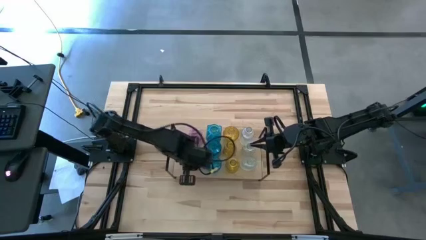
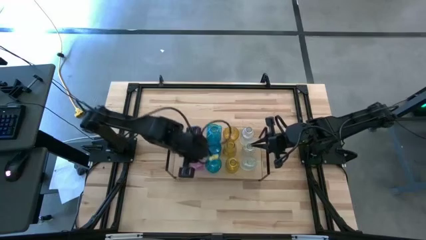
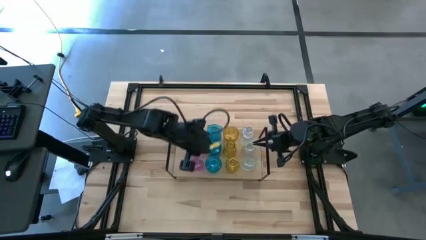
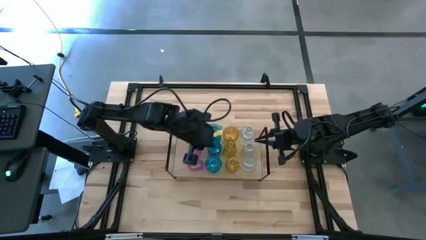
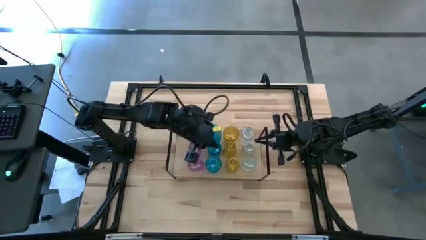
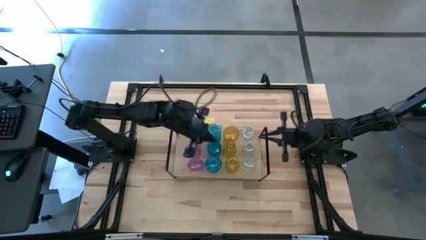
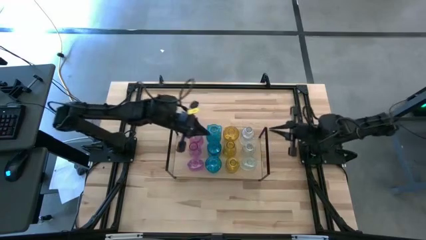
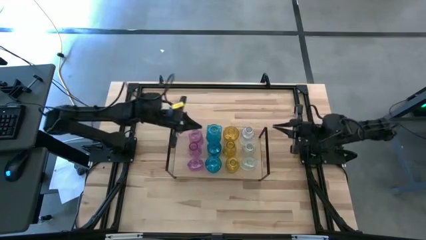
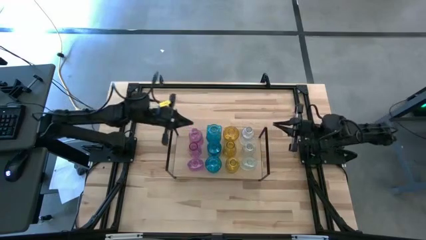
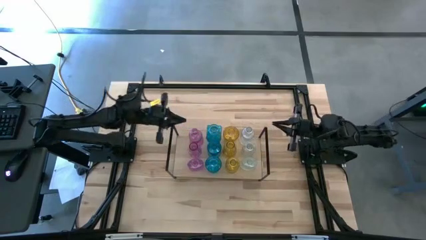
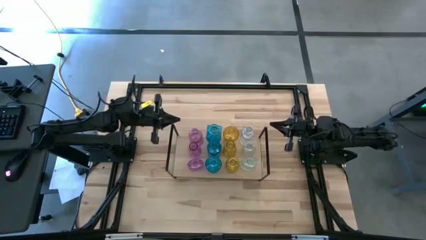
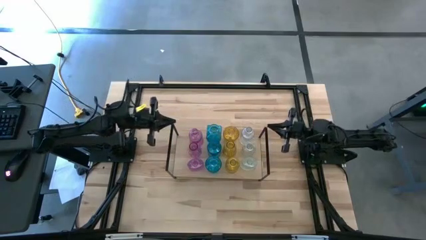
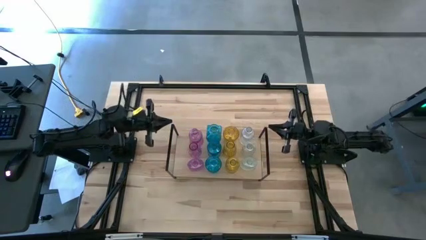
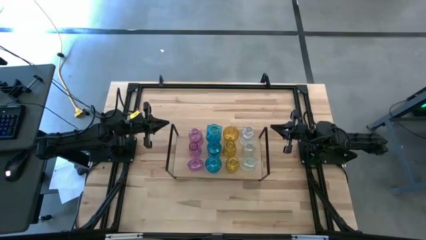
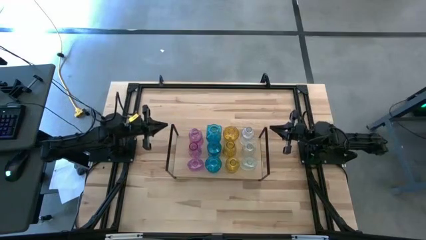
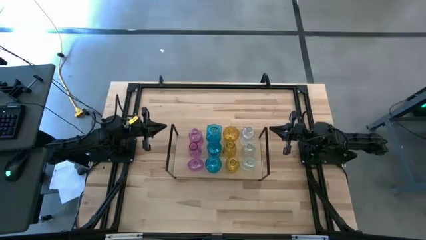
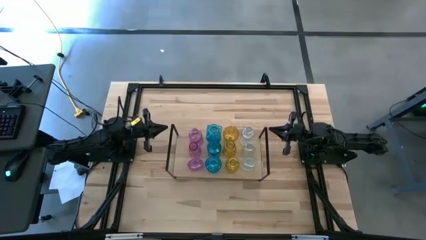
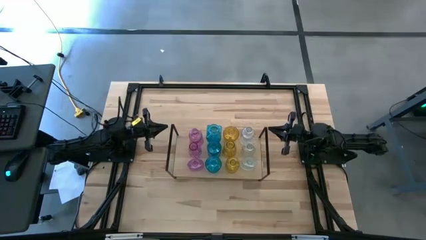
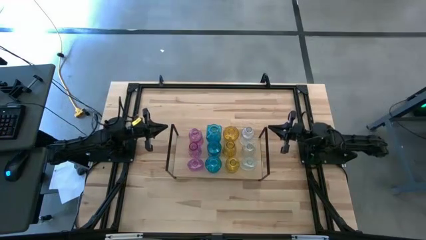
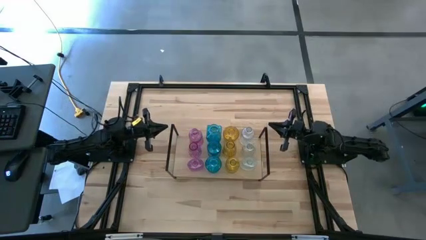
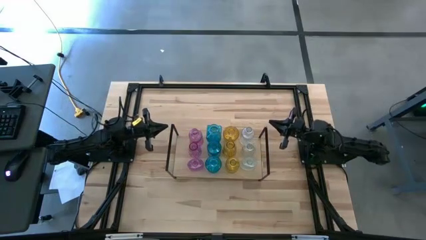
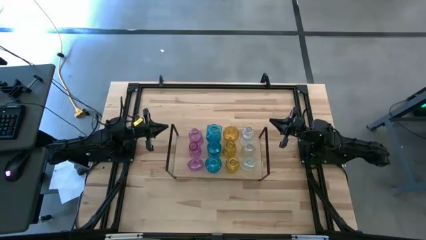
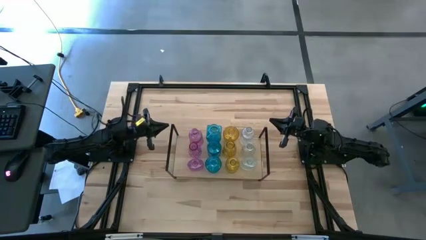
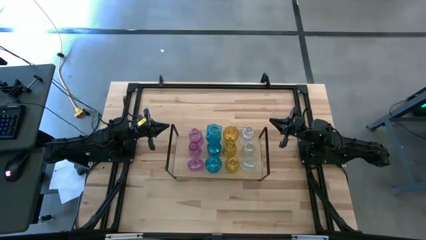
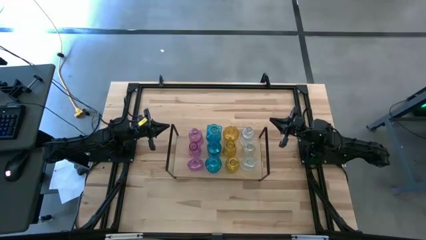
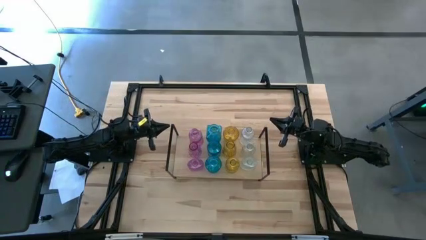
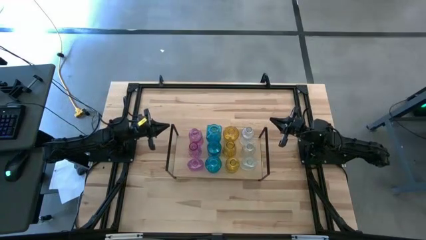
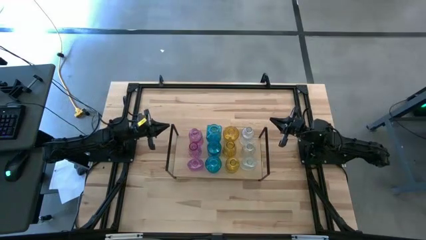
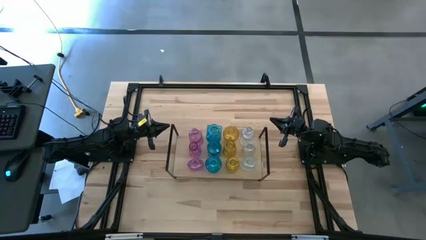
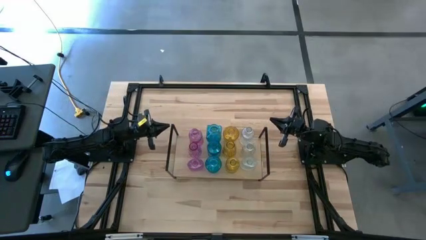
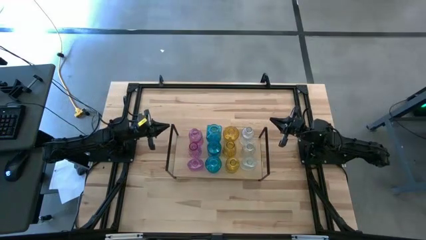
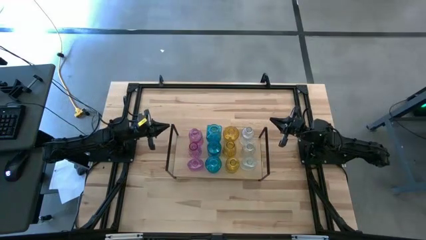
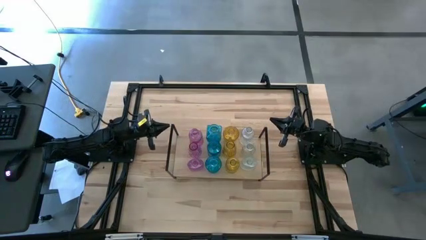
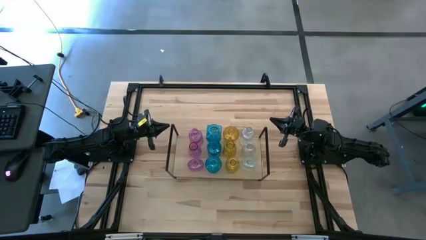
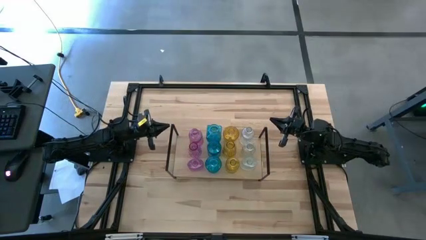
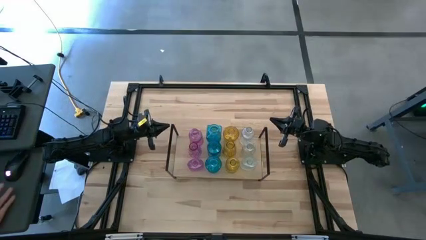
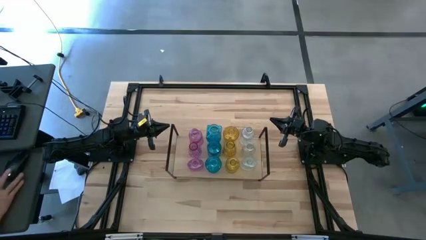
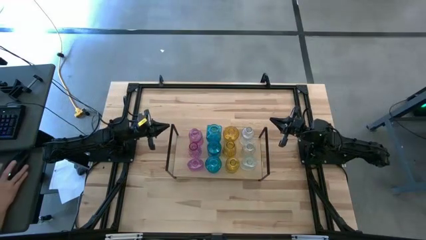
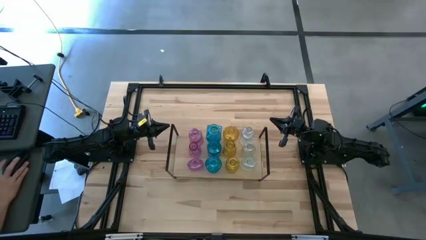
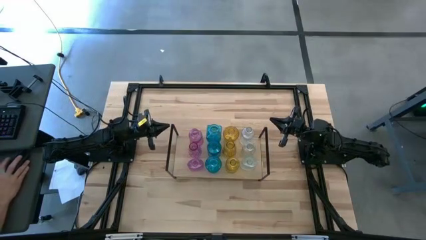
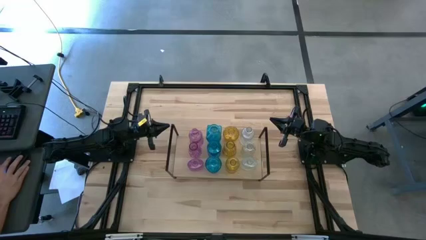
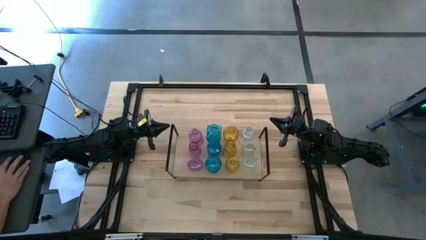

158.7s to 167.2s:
Task: sort vases onto shelf
Return to Home Position

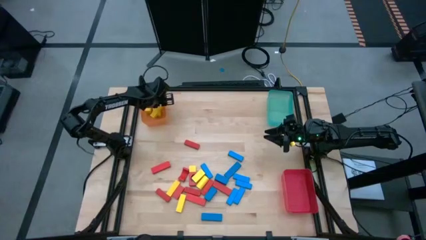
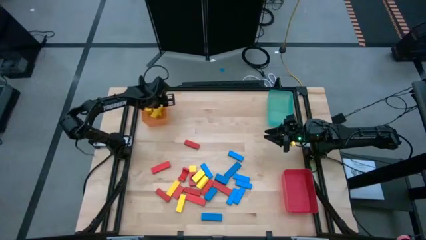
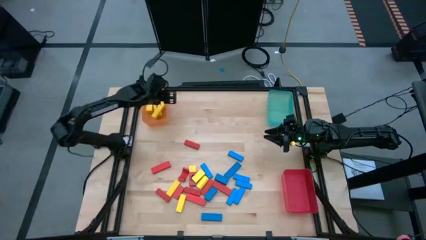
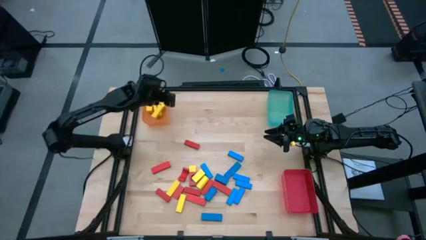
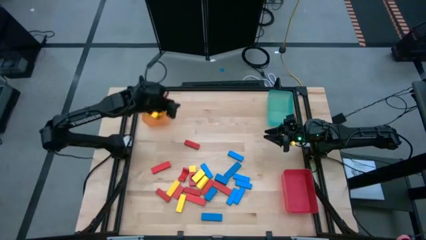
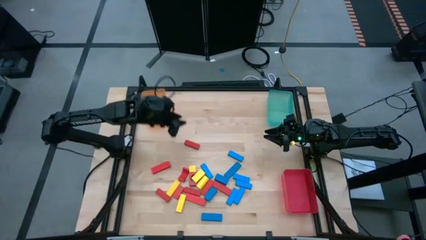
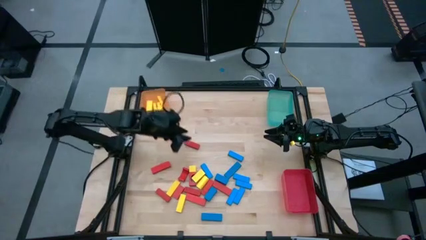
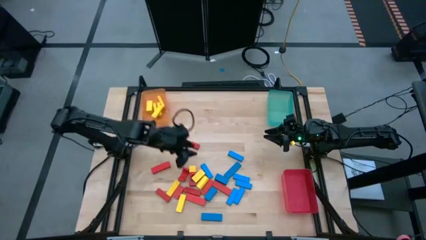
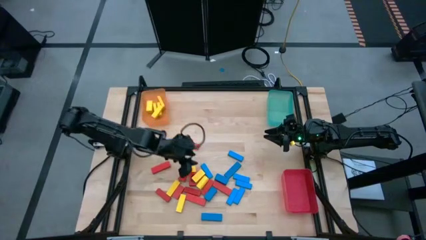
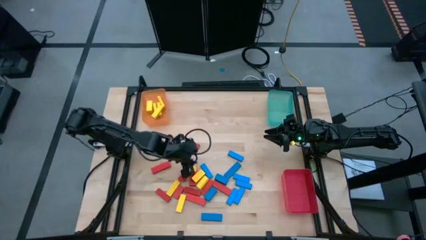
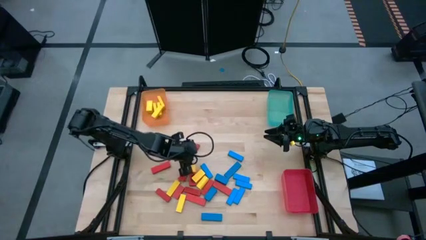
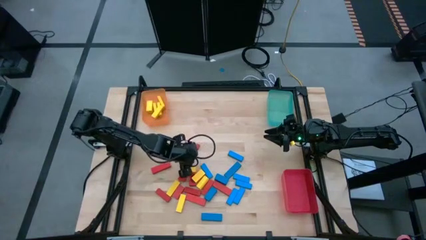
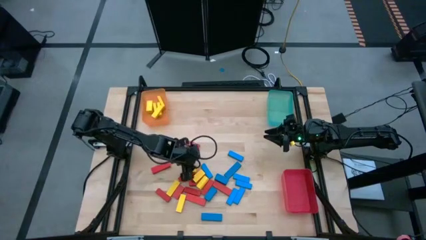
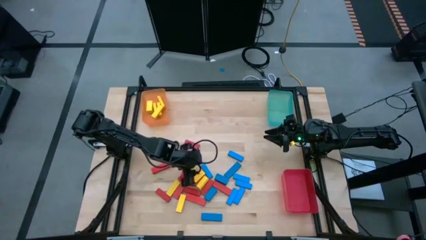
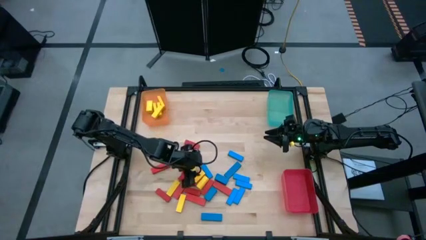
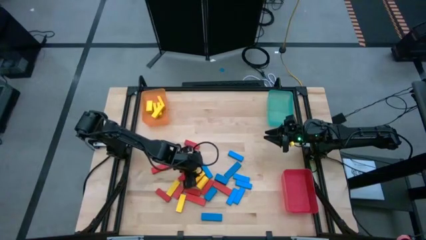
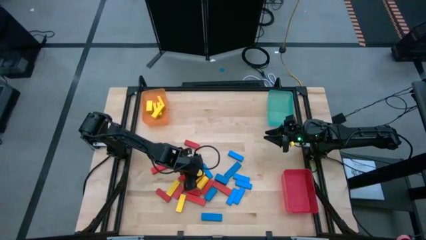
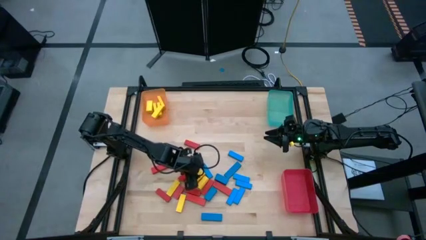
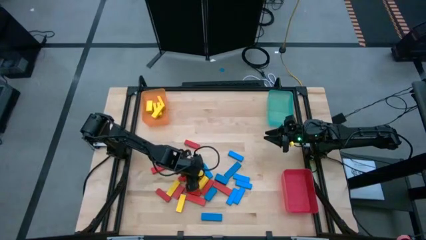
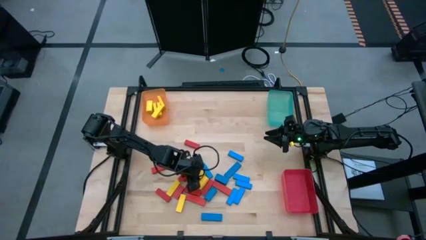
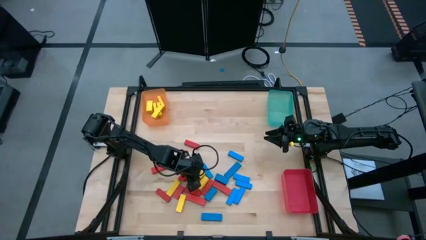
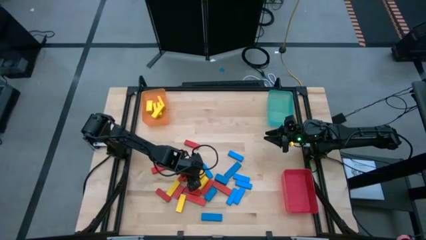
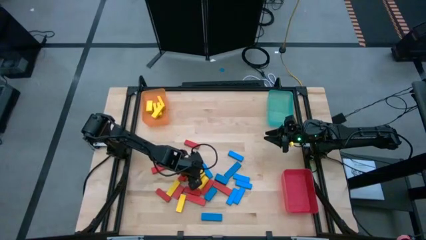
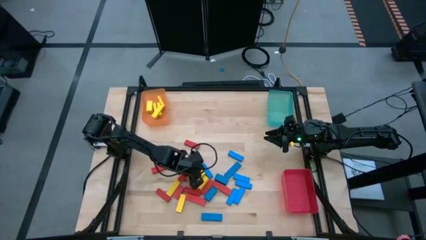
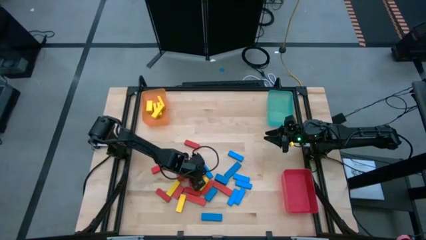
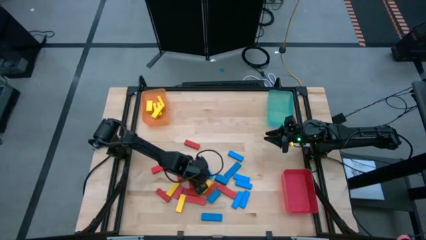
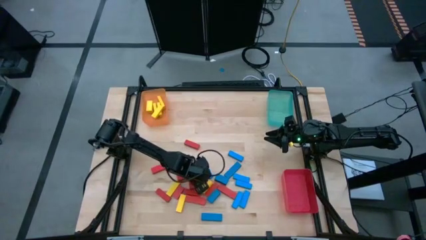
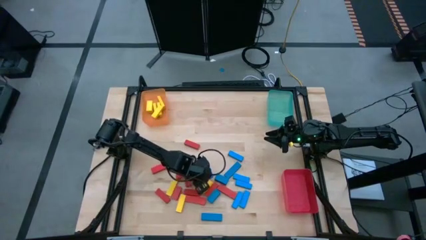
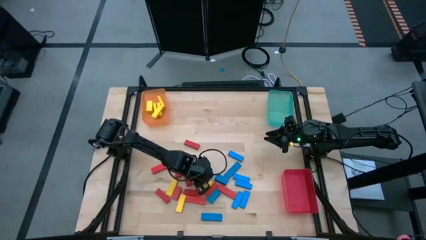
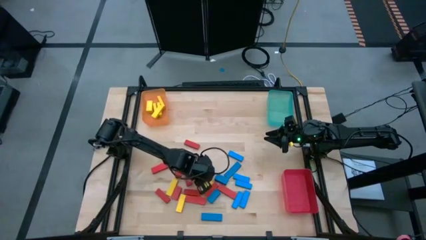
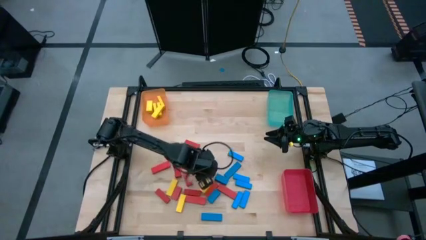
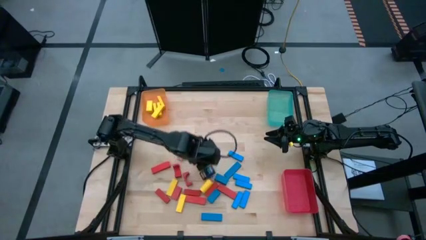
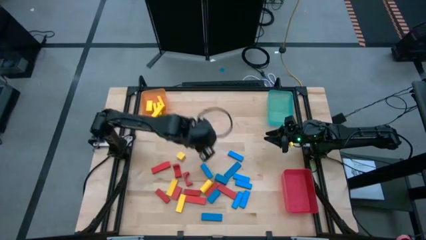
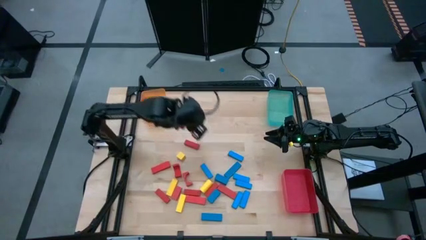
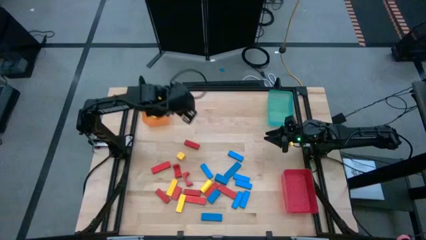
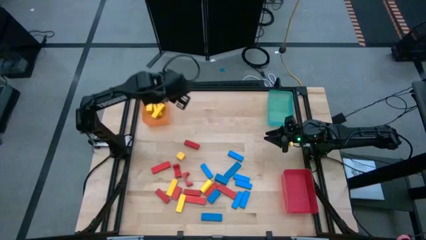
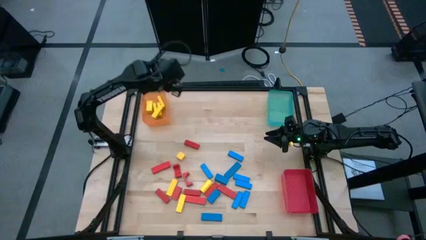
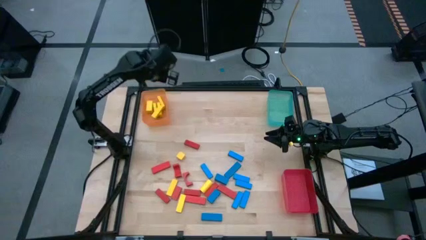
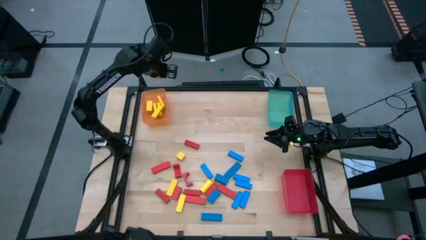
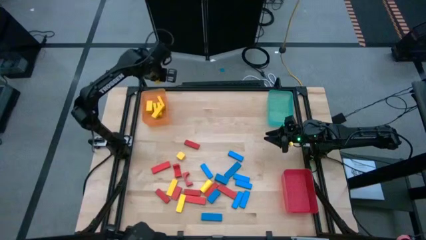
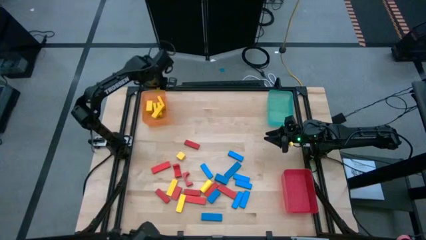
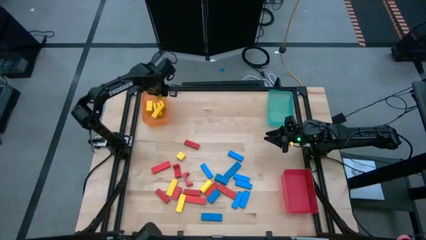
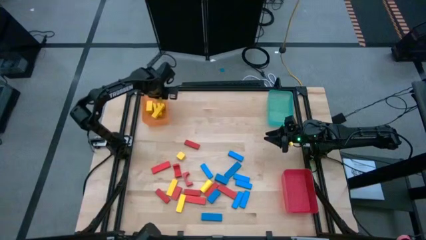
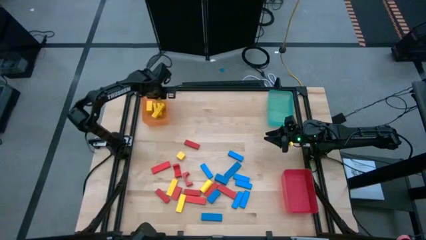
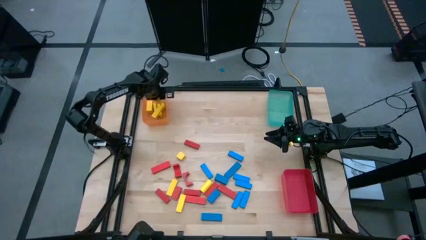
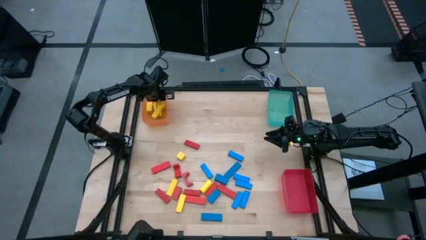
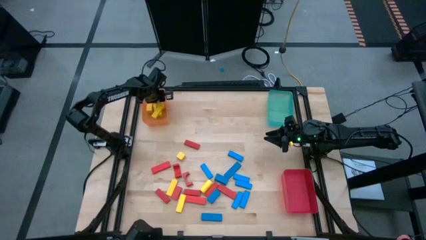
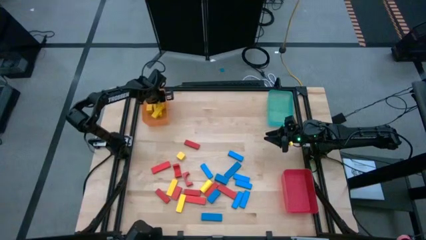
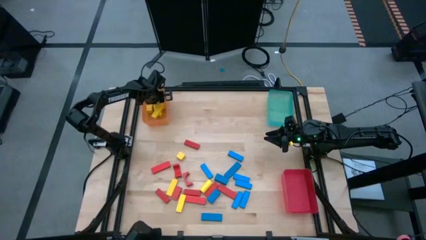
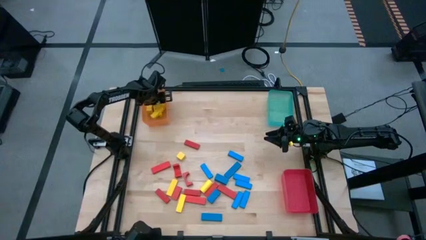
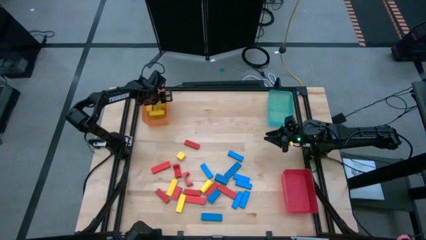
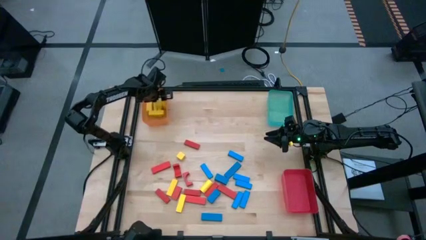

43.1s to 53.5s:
Task: Sort blocks
Put the yellow block into the orange bin
